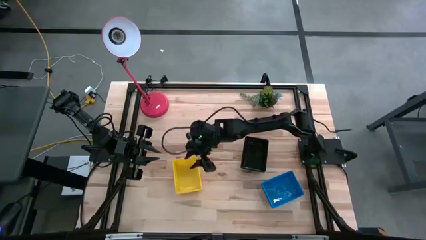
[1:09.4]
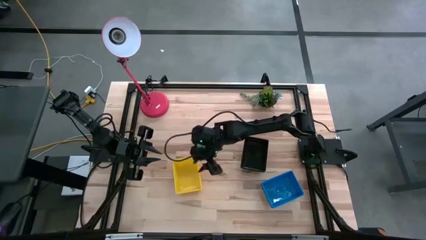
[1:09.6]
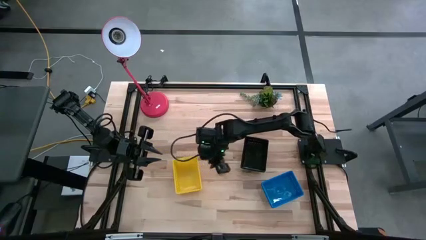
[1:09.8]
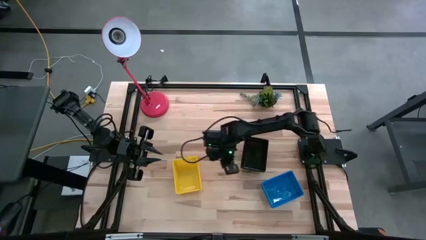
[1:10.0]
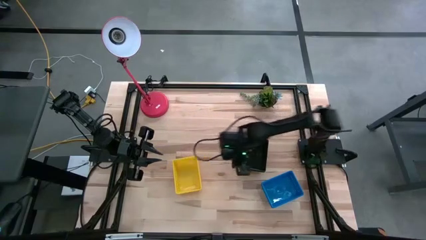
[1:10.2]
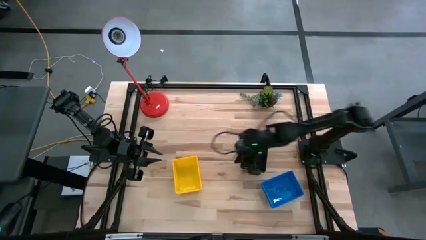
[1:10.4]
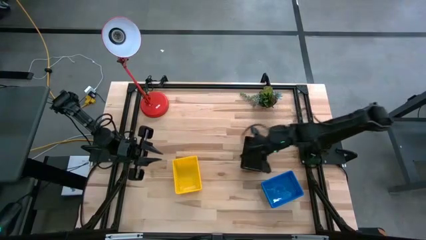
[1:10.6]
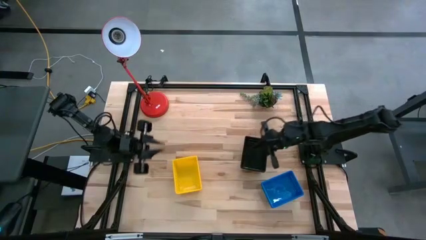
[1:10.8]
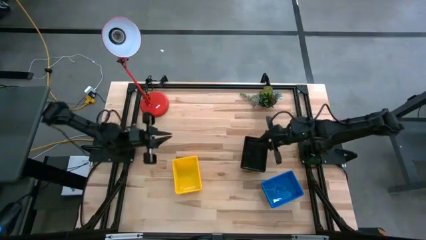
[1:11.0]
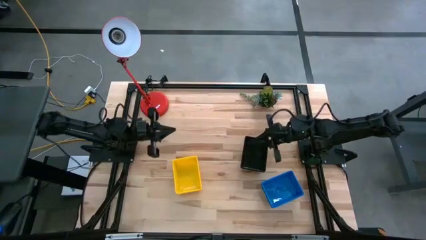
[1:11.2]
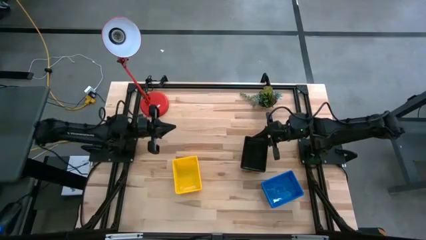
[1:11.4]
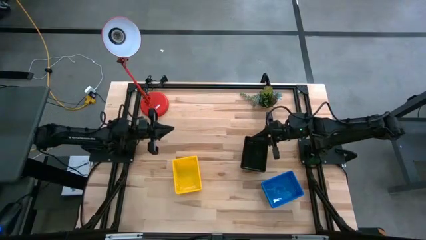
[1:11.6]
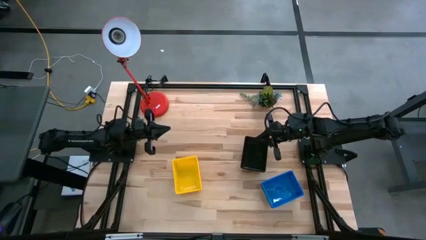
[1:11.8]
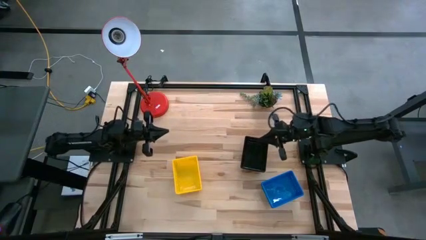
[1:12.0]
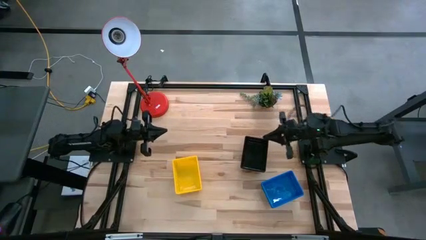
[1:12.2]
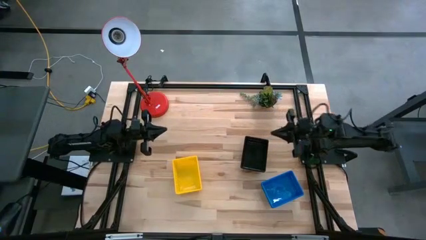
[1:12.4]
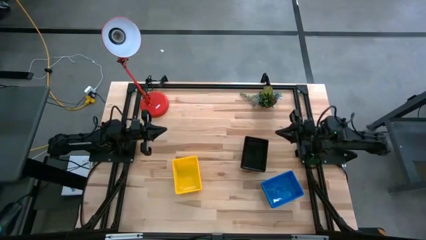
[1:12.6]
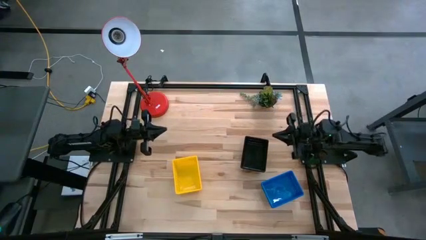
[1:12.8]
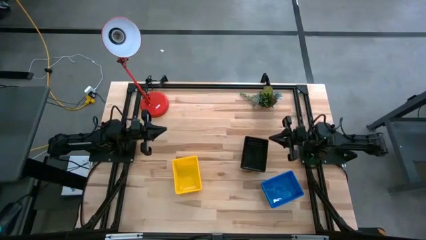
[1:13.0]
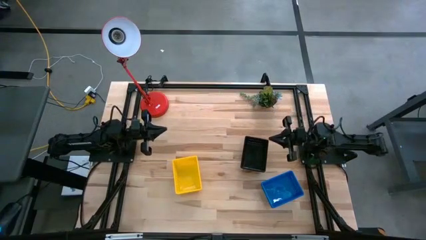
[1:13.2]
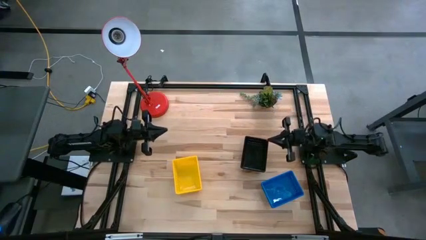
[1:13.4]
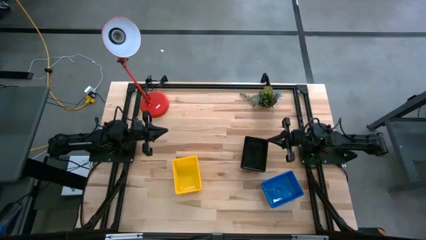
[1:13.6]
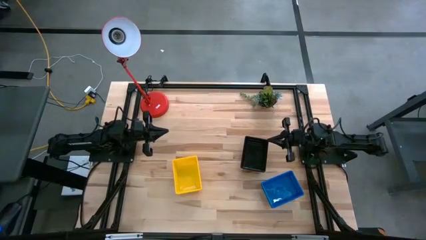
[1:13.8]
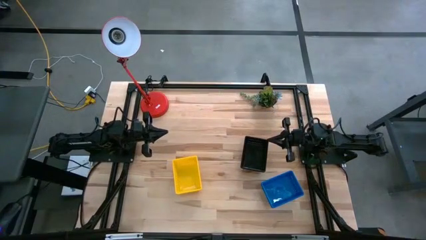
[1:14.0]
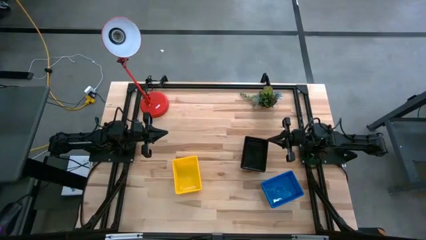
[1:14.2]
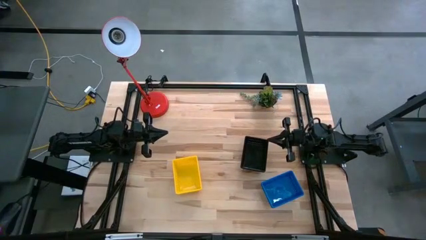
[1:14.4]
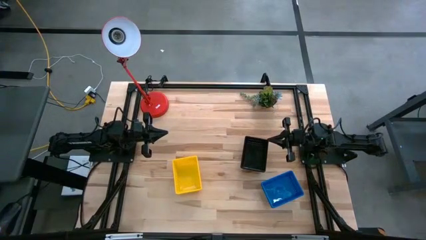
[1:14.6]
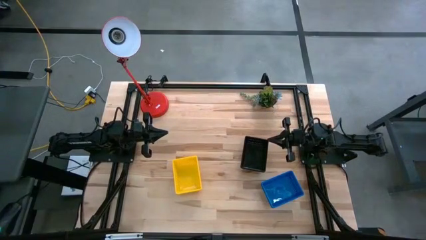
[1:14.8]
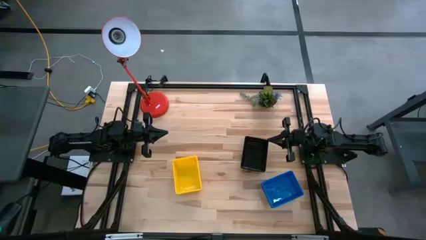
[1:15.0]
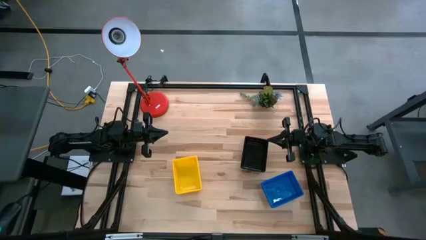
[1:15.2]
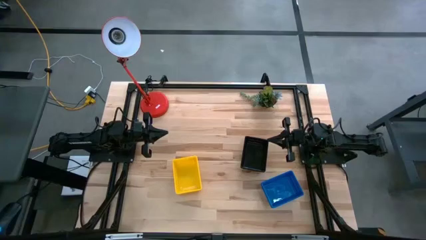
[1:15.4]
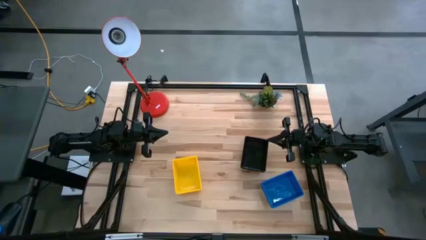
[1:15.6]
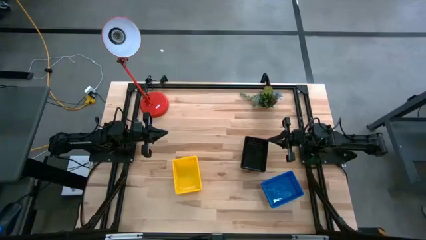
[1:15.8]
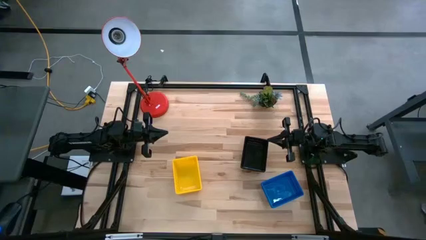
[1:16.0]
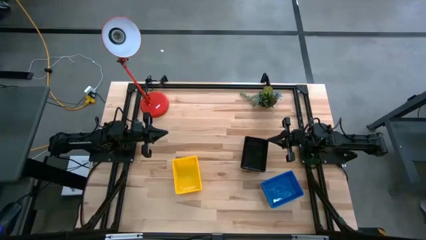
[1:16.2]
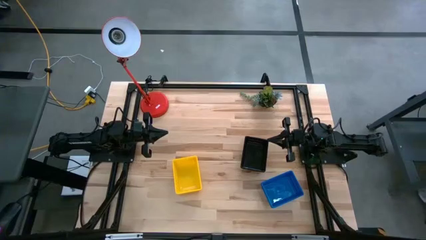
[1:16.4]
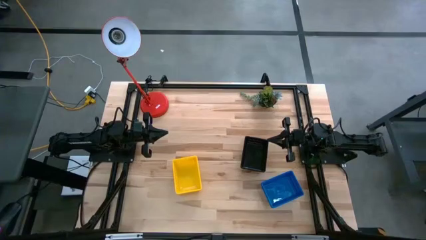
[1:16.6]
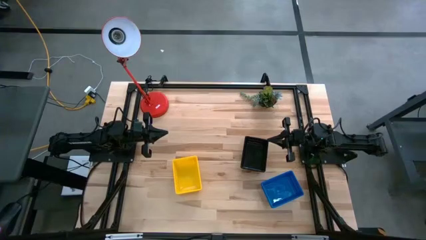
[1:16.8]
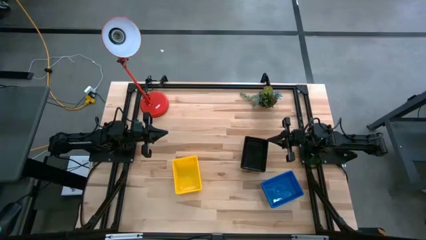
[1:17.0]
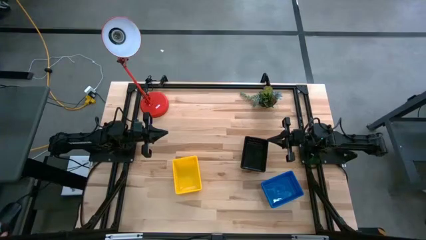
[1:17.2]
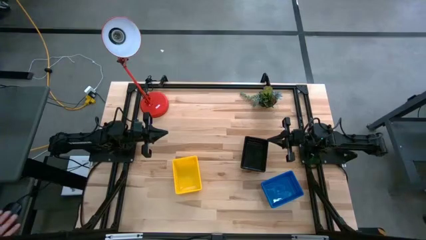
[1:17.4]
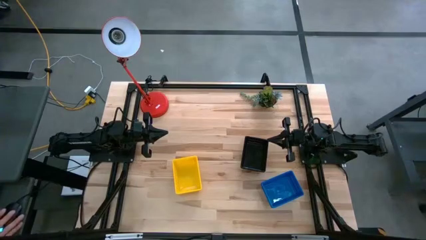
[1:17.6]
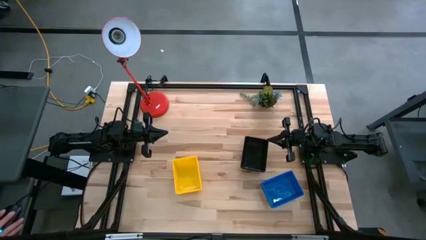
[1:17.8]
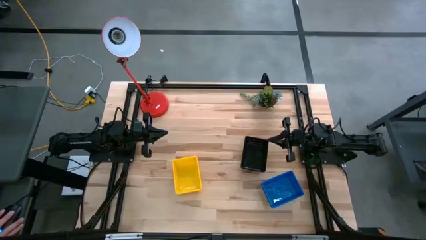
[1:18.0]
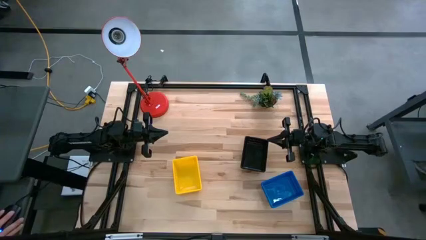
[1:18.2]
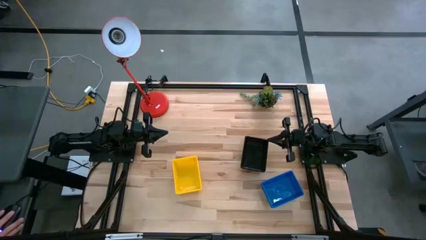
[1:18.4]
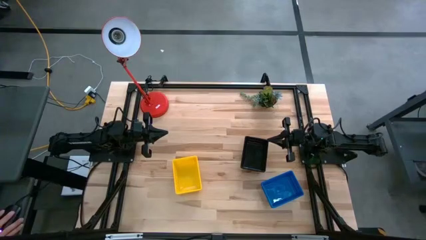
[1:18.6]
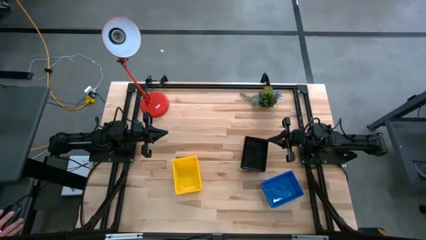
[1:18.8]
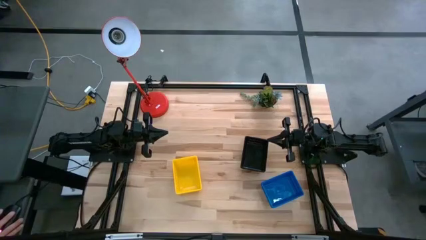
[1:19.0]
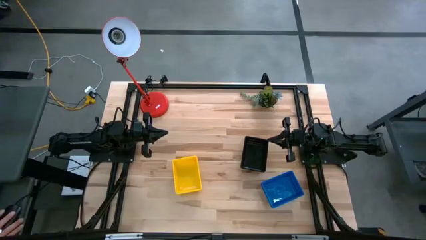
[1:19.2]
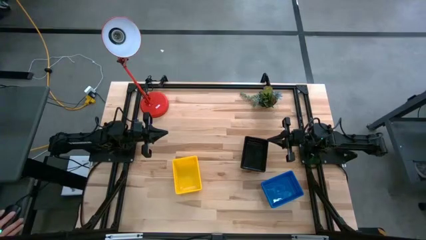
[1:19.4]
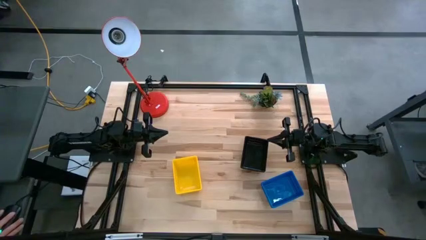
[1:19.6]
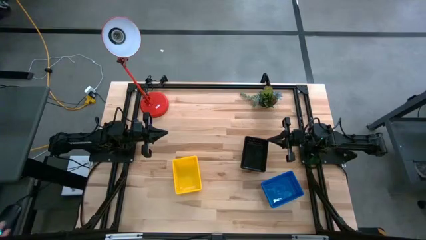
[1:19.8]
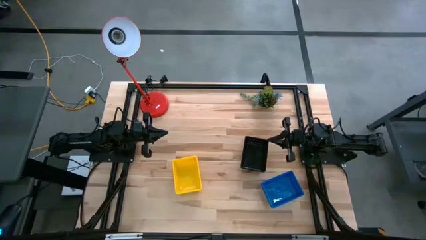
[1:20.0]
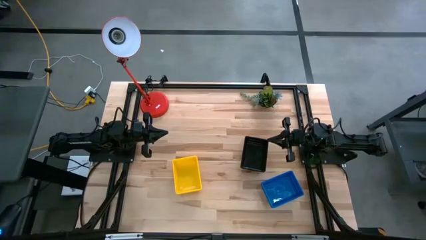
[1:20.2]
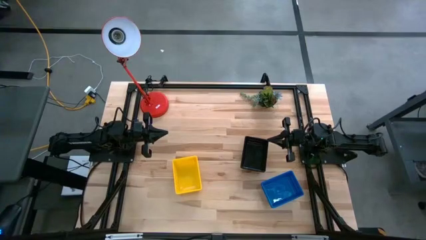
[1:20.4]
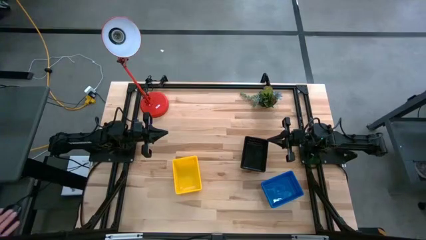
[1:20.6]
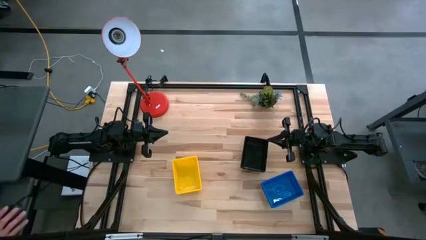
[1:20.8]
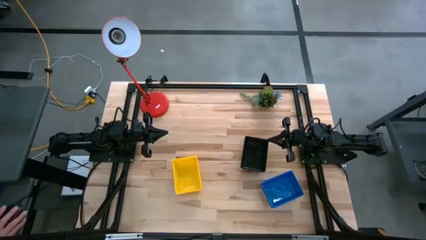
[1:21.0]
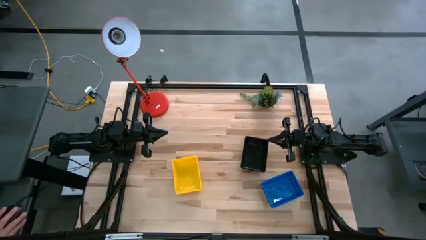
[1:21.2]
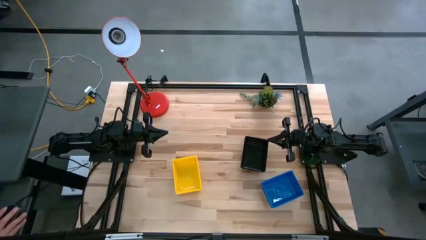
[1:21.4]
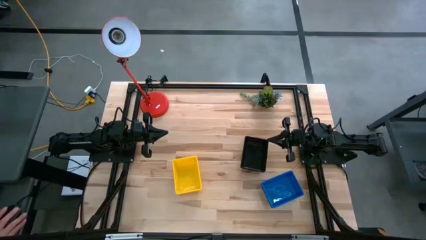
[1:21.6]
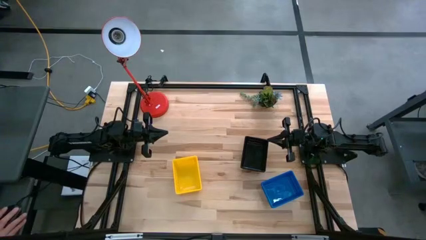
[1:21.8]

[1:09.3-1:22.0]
Return to Home Position
